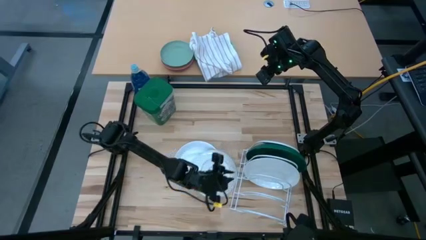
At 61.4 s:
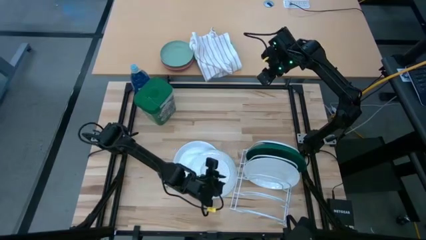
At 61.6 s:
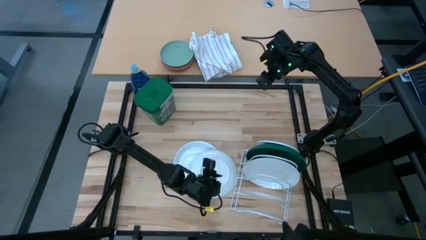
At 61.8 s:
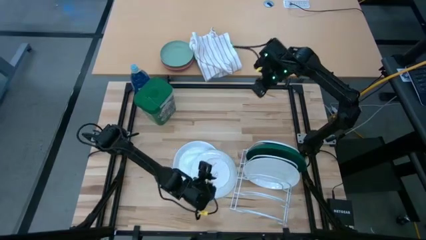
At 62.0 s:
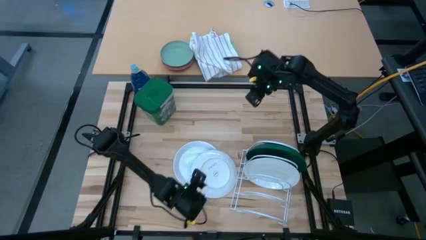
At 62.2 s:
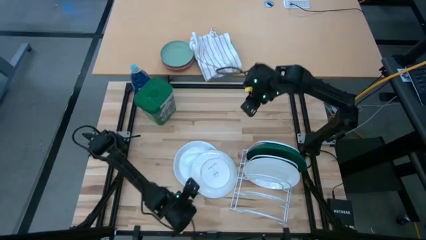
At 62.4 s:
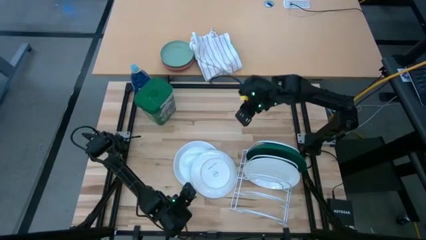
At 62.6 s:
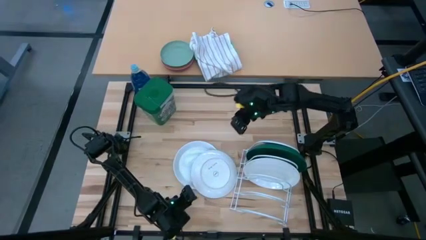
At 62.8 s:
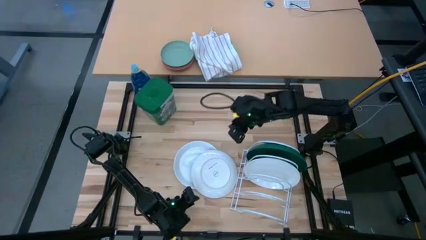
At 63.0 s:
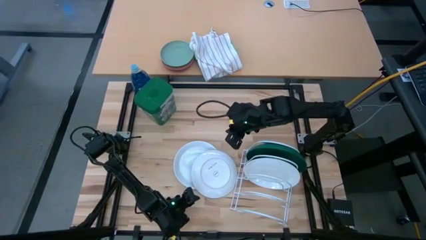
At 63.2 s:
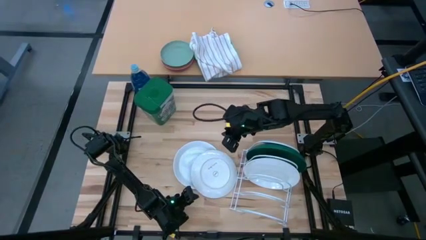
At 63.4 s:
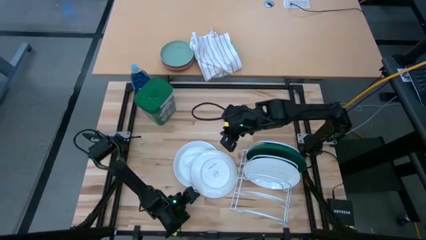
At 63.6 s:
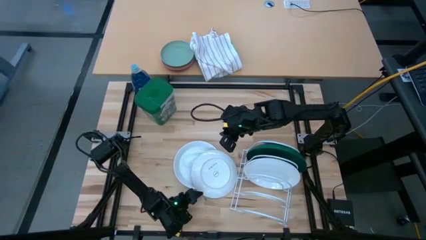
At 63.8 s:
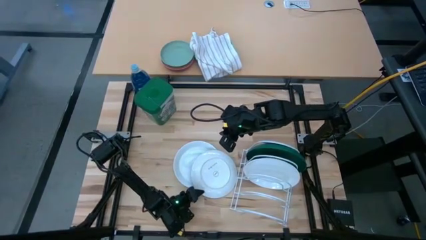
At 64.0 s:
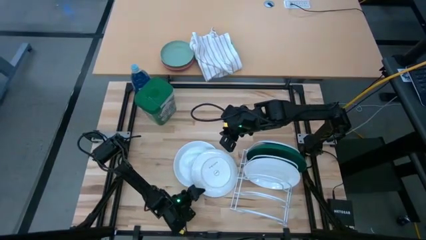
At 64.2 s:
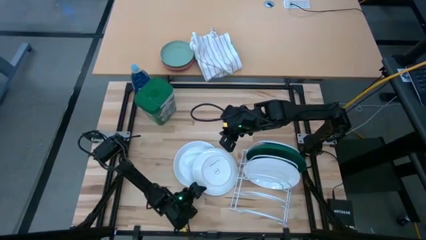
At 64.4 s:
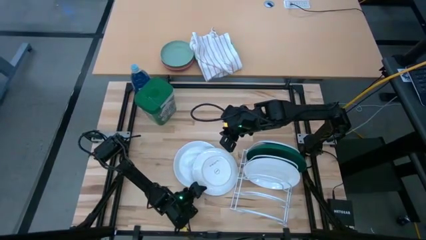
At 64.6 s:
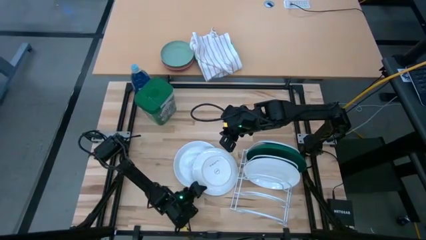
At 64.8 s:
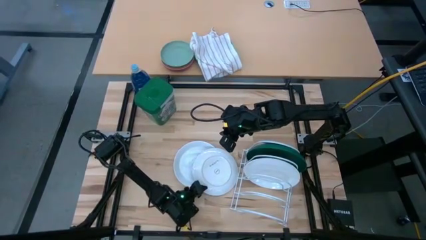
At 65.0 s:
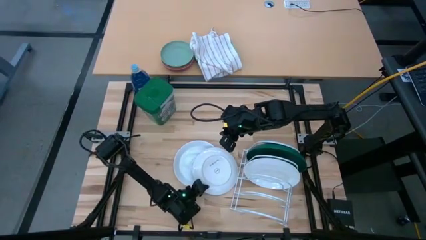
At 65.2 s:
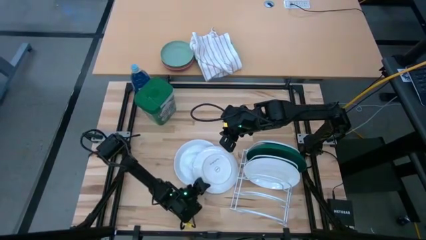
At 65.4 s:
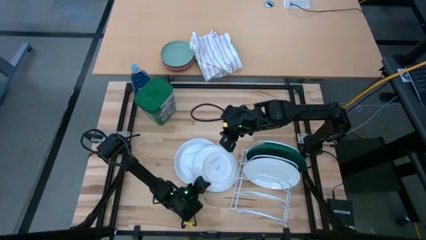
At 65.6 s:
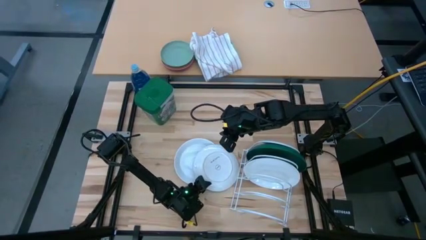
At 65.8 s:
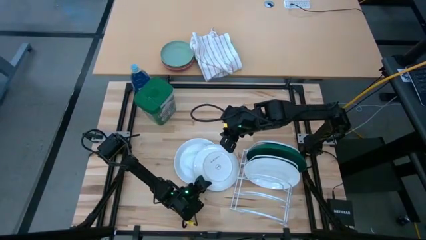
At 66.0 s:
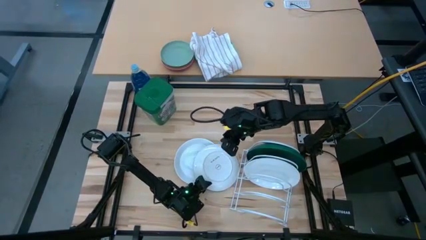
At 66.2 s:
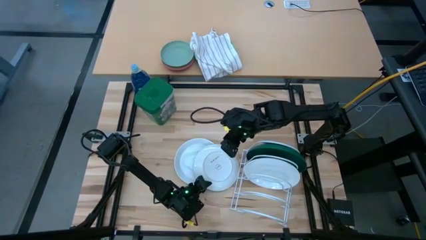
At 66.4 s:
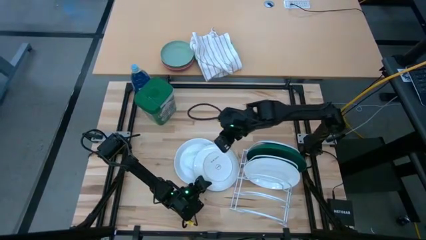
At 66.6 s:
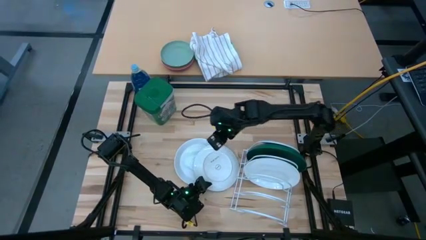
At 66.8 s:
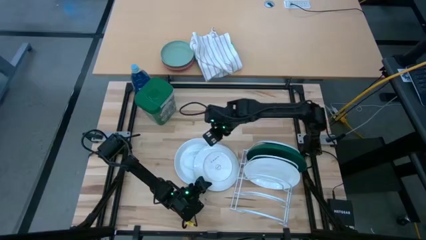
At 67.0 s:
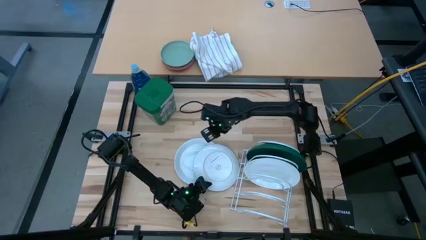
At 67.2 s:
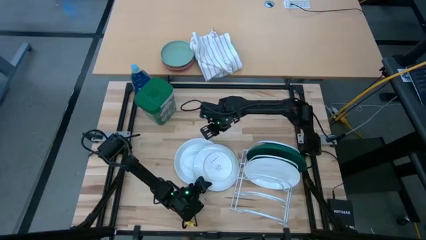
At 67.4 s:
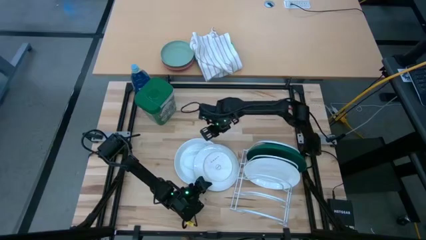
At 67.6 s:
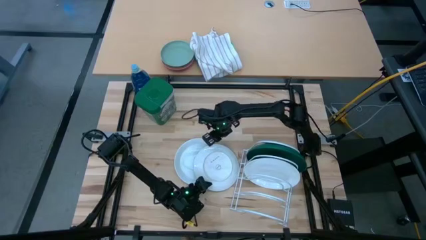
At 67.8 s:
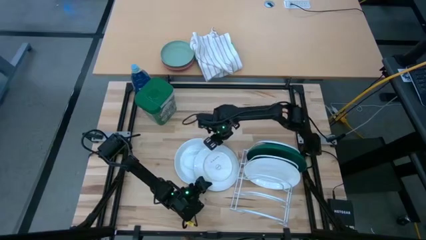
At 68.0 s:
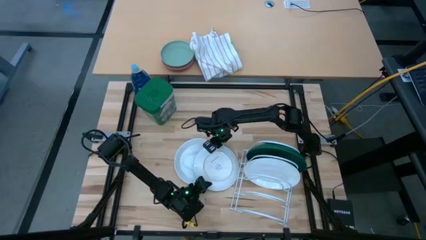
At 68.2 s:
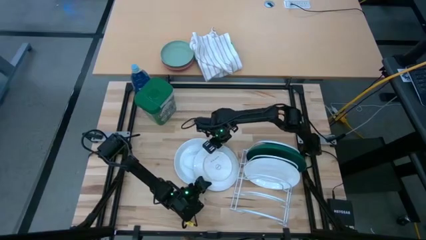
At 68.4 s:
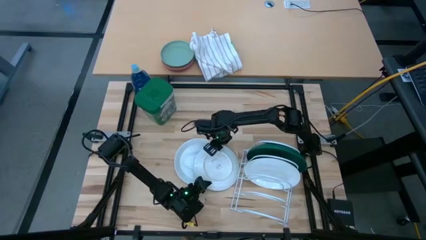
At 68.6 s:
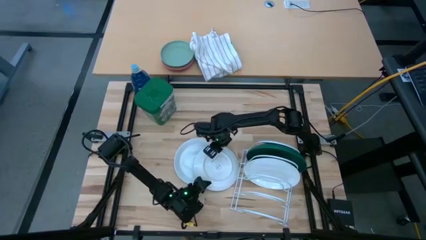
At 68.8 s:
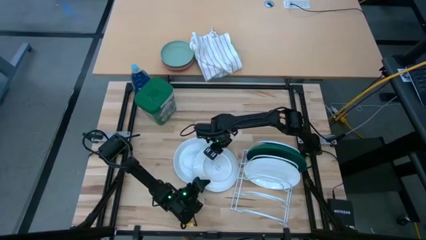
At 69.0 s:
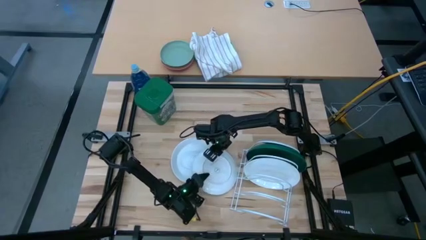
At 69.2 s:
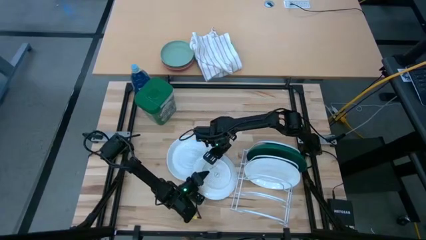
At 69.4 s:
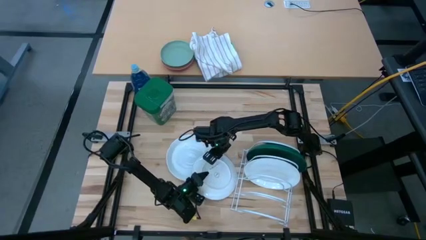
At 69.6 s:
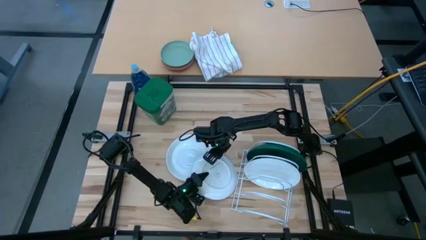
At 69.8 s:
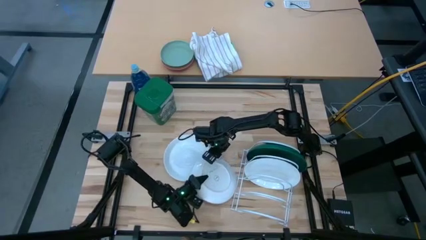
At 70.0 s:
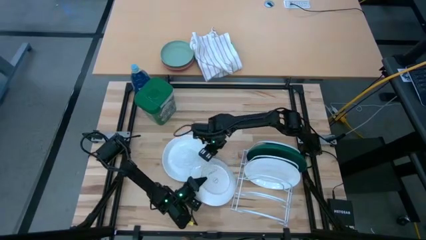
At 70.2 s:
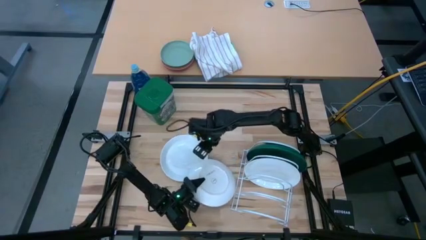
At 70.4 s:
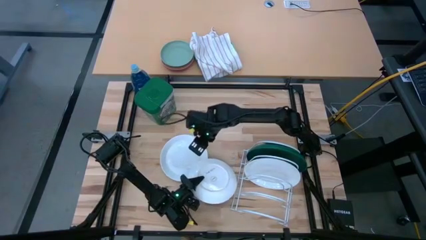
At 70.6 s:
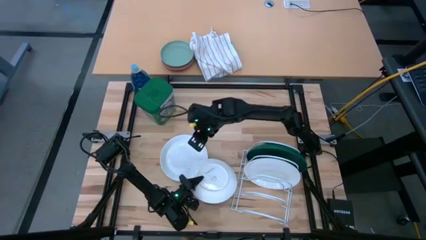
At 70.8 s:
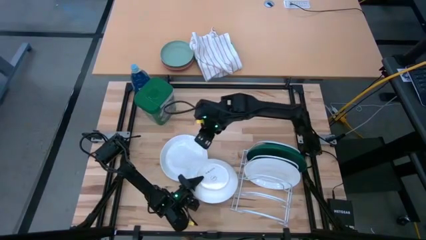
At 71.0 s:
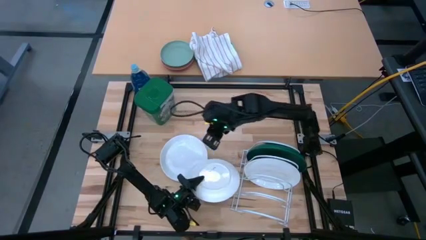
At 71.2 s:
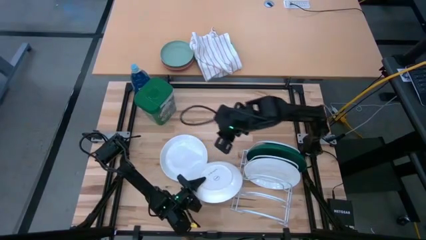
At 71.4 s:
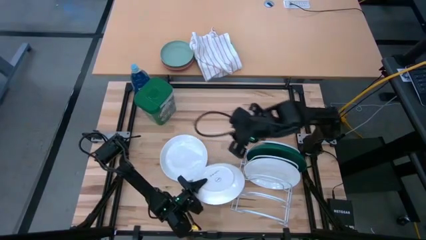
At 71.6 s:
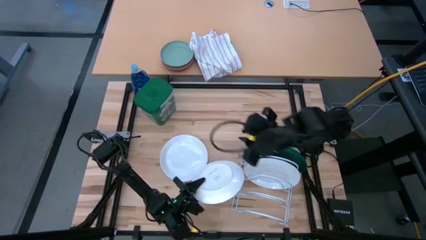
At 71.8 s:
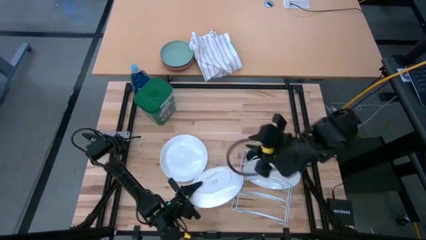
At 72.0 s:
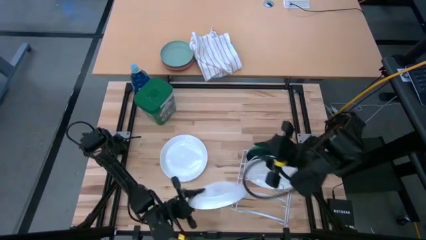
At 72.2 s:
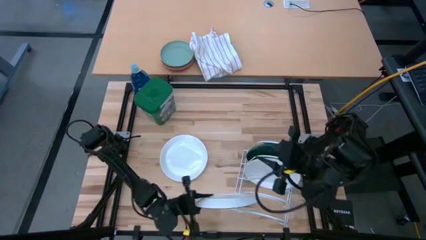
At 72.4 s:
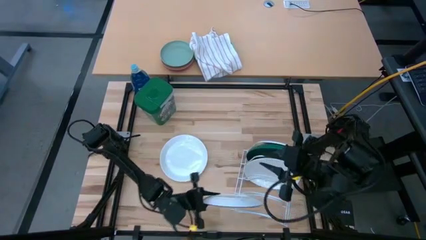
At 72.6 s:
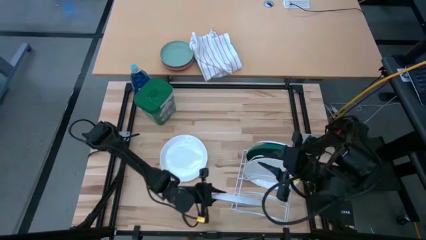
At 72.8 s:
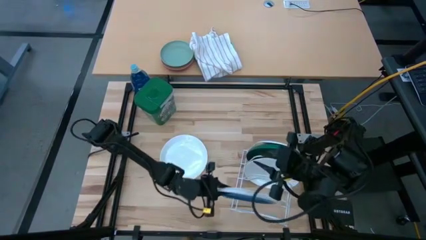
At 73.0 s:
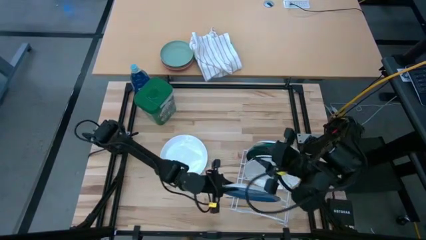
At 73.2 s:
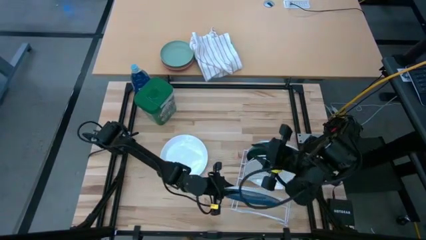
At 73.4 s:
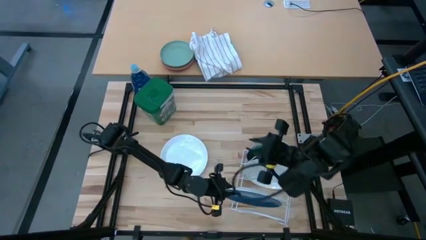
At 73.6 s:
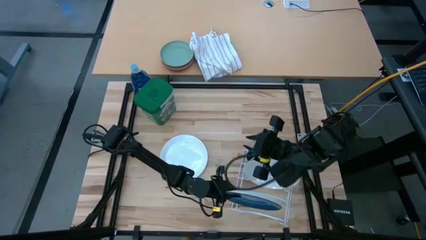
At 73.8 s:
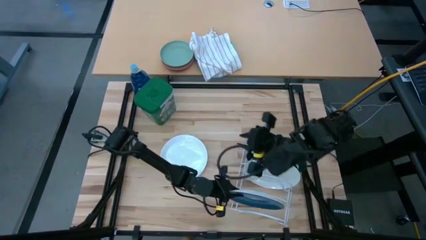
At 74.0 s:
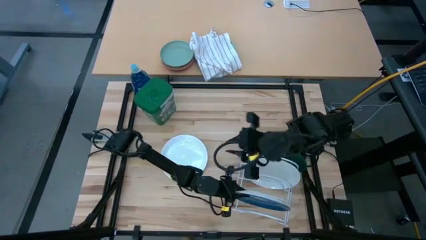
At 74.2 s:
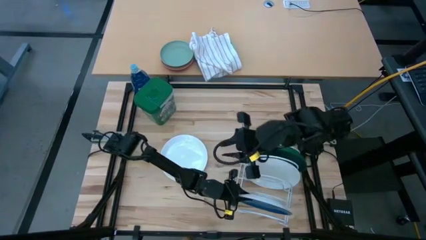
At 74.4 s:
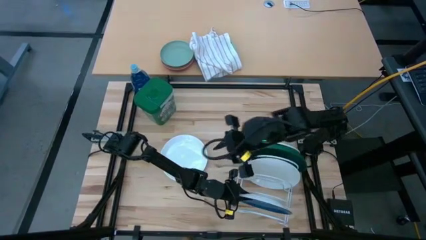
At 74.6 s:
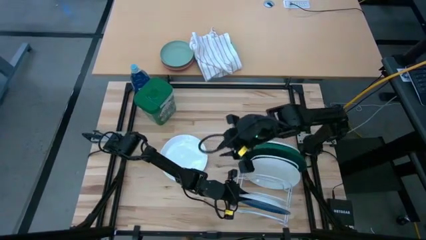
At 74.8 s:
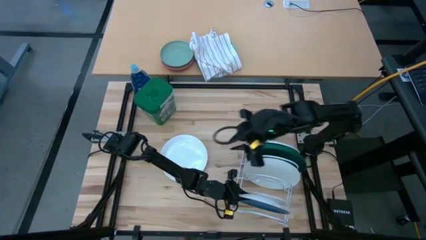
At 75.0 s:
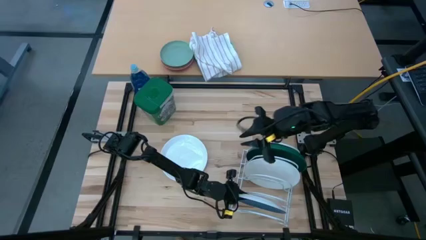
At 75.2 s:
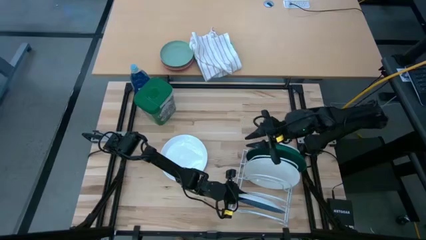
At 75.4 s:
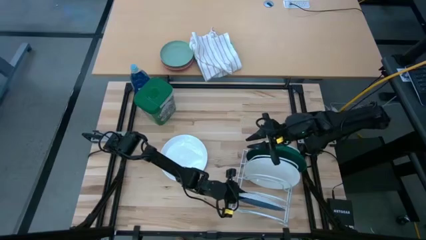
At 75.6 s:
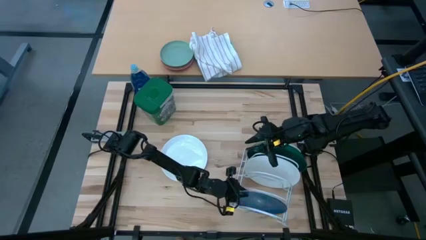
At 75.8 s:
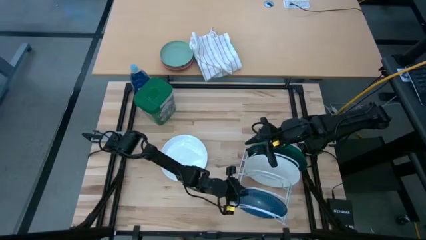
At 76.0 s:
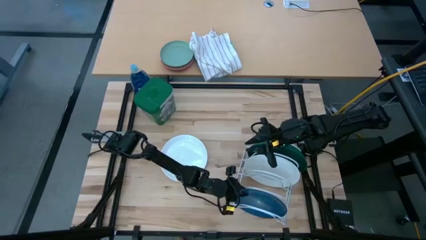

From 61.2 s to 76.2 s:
Task: Sort dishes
Put the bottom right white plate on the dish rack
